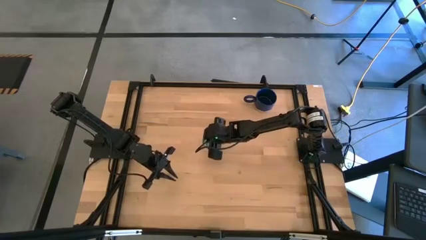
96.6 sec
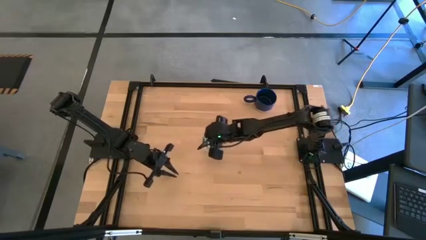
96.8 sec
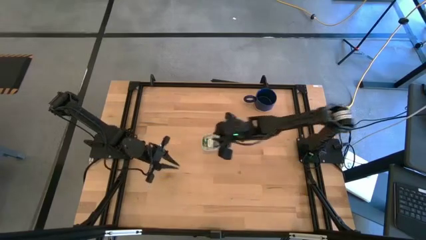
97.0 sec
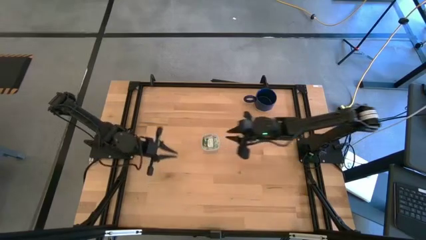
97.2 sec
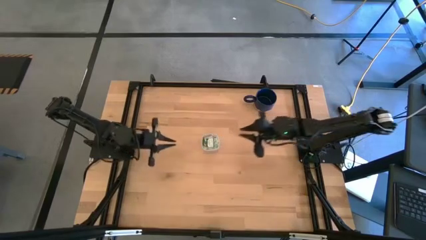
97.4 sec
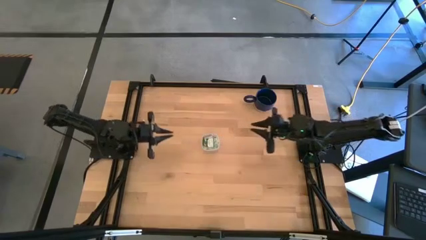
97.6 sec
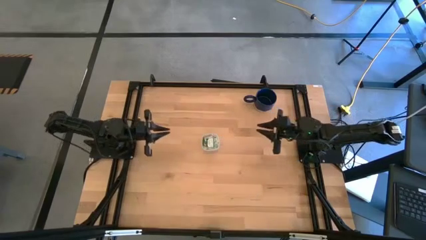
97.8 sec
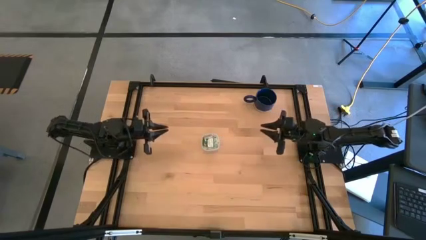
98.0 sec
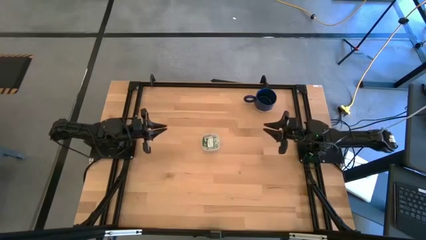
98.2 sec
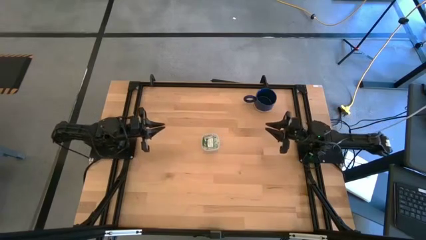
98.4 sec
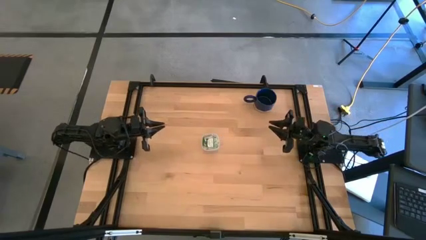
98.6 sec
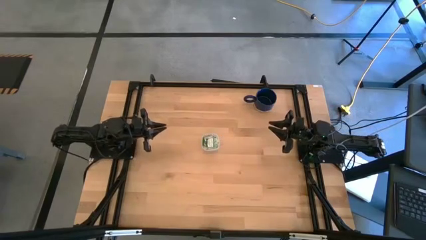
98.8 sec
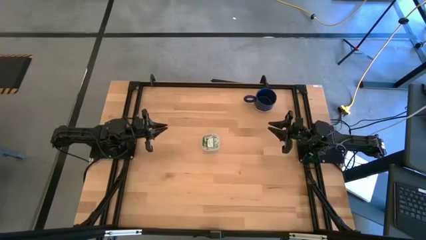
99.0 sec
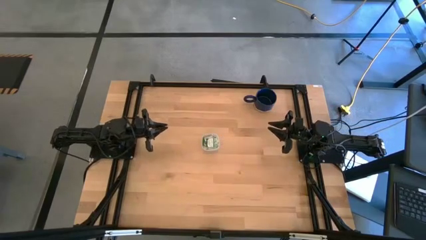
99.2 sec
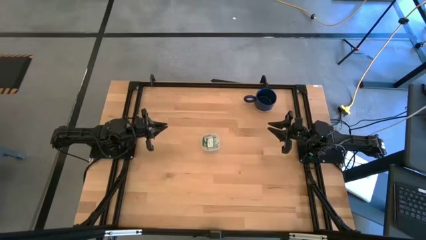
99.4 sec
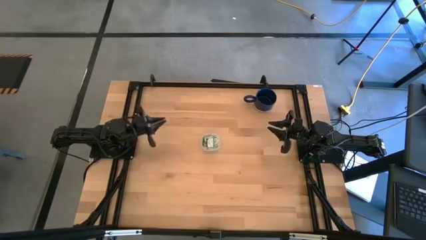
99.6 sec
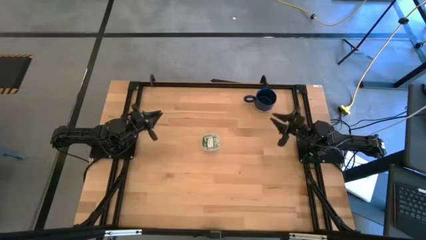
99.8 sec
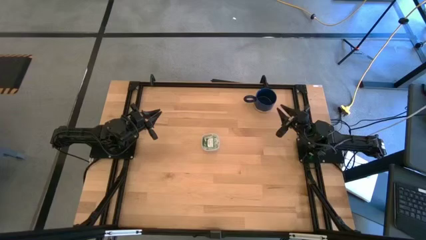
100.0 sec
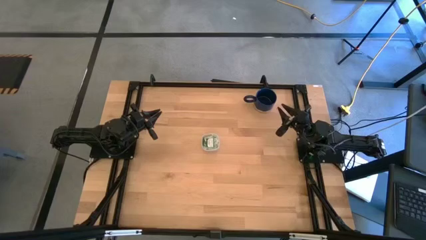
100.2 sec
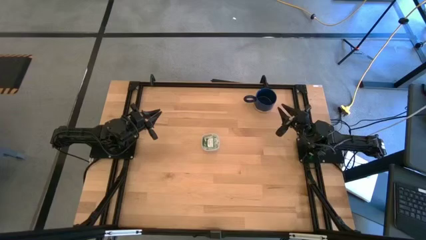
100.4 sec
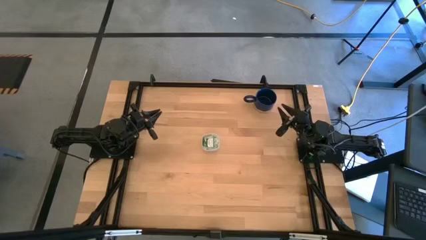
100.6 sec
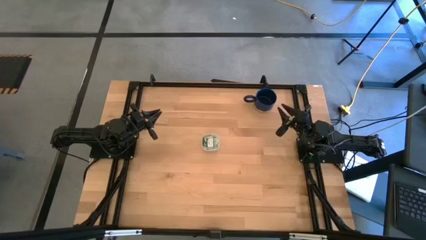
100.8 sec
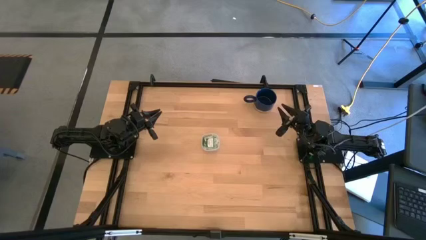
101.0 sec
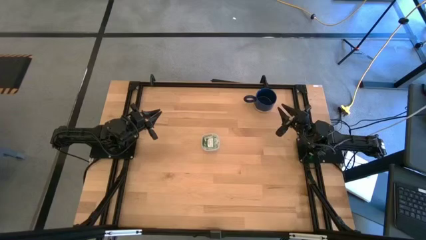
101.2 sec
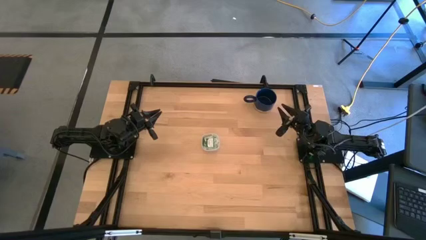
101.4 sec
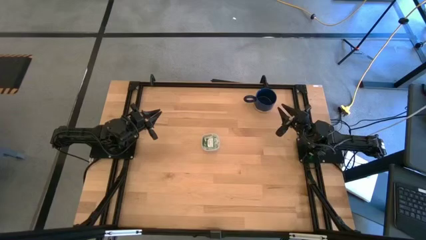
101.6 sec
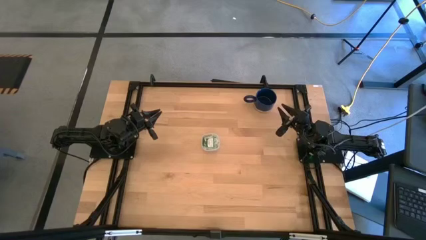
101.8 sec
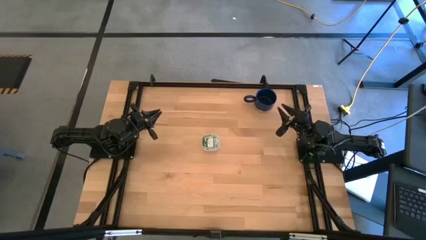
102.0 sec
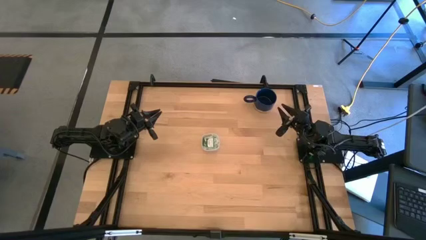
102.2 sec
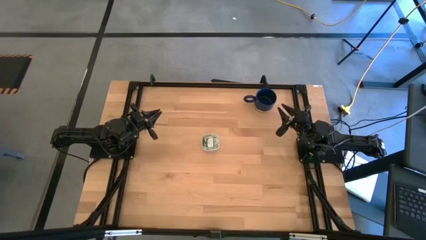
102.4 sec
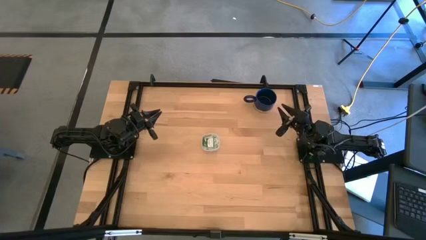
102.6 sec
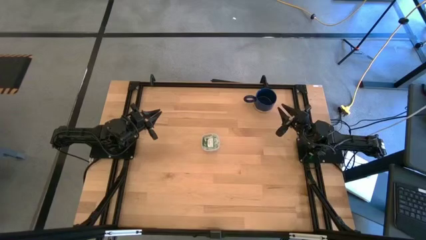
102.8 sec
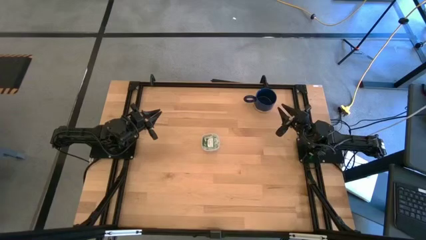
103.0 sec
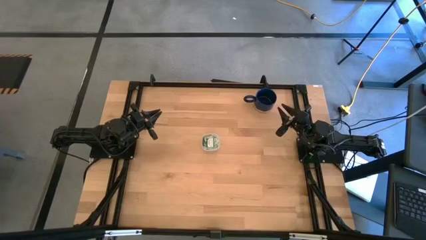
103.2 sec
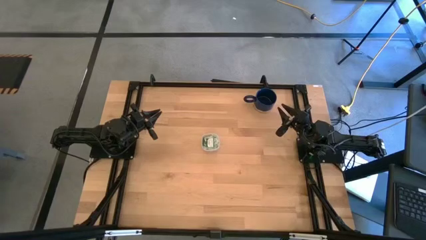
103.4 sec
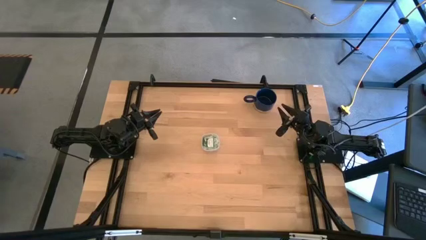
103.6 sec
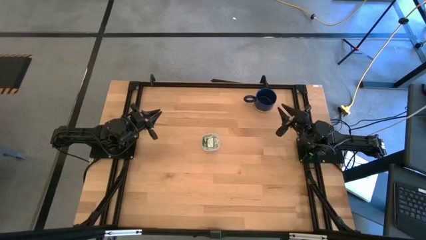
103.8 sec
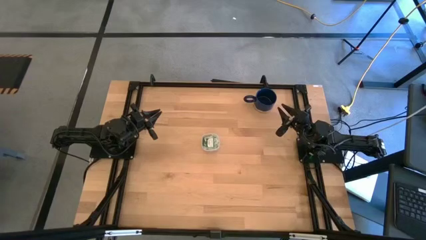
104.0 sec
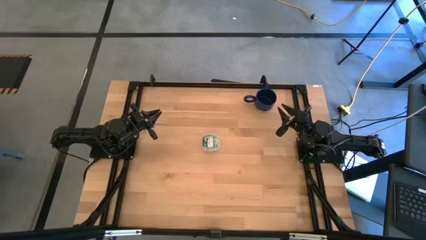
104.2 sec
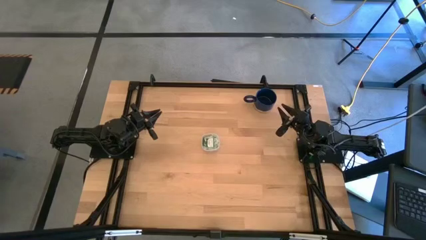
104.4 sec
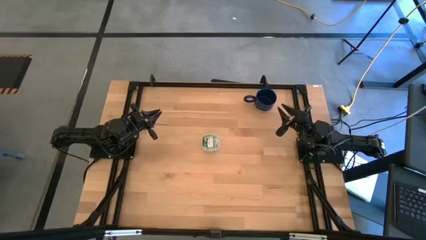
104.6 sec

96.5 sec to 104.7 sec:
Task: Pick and place Stevia / Truvia into bins
Return to Home Position

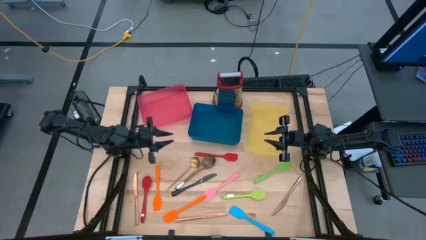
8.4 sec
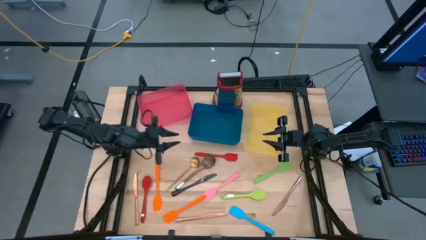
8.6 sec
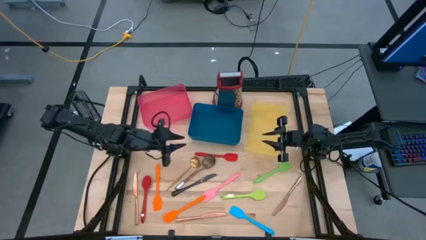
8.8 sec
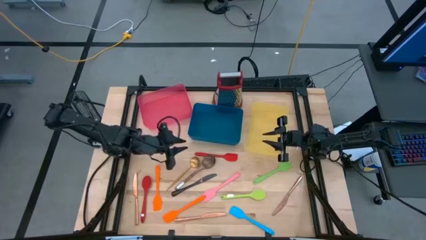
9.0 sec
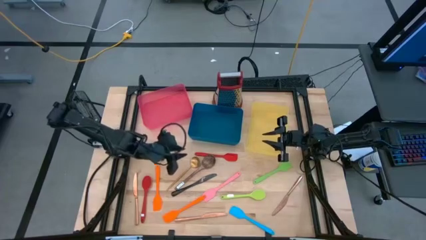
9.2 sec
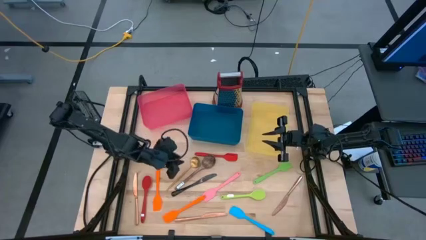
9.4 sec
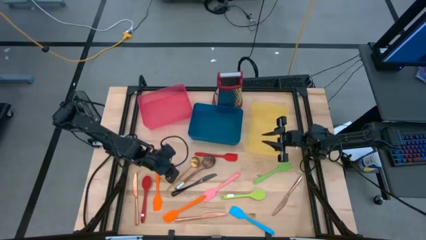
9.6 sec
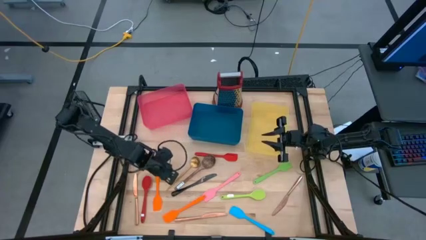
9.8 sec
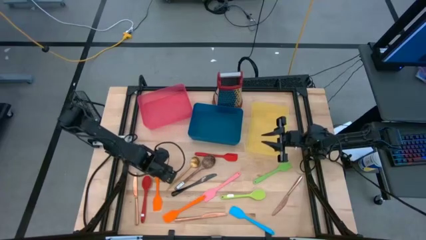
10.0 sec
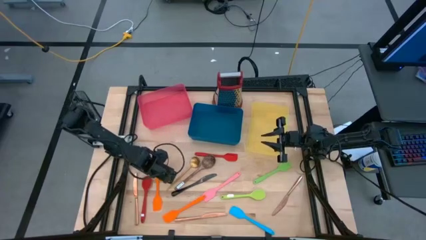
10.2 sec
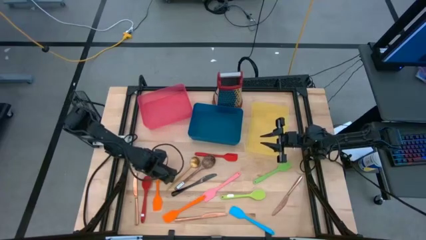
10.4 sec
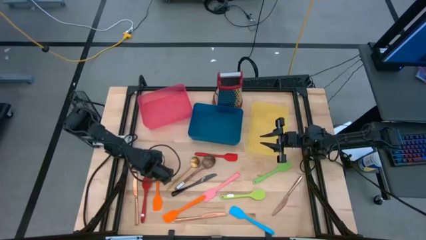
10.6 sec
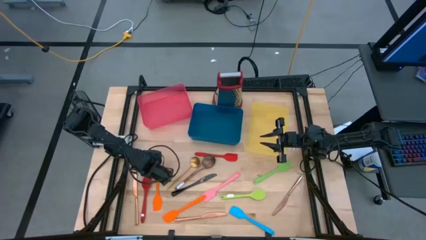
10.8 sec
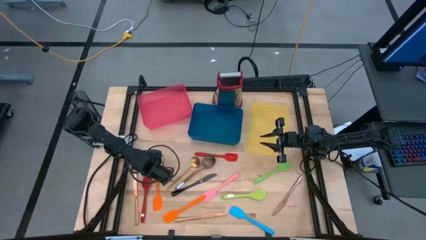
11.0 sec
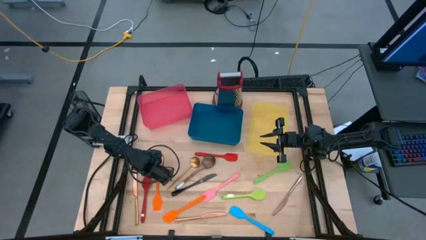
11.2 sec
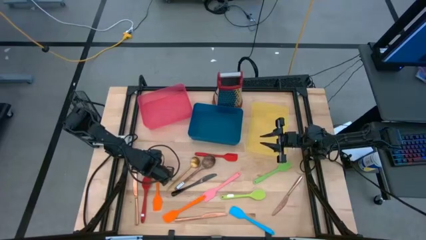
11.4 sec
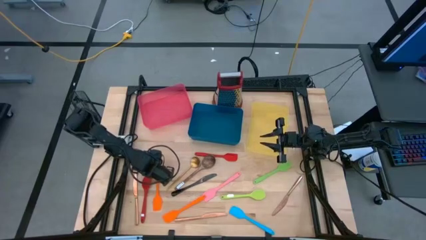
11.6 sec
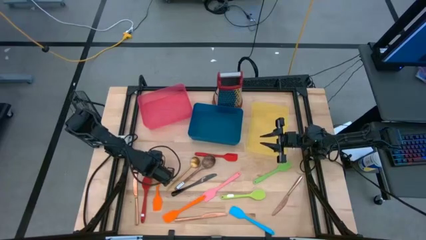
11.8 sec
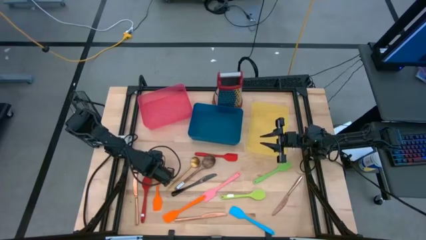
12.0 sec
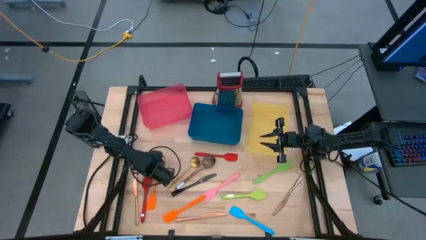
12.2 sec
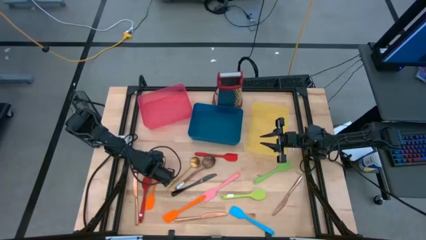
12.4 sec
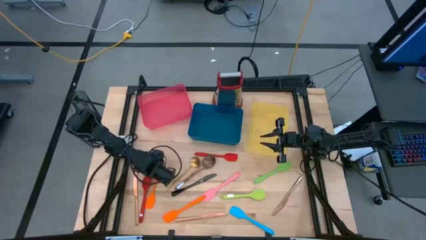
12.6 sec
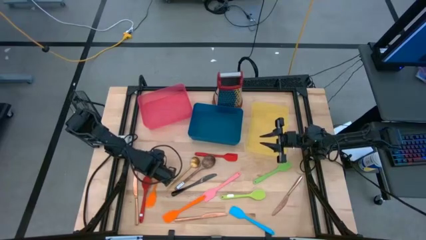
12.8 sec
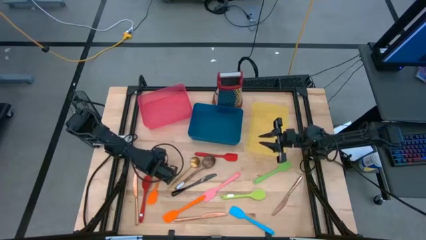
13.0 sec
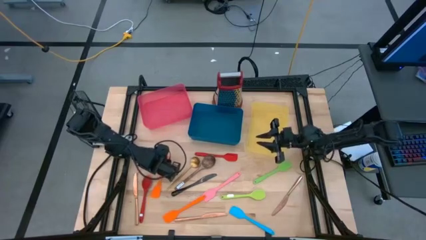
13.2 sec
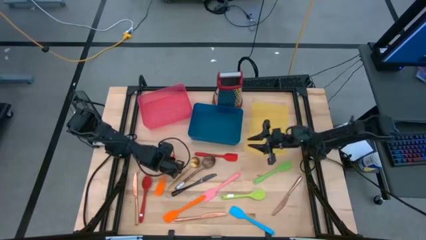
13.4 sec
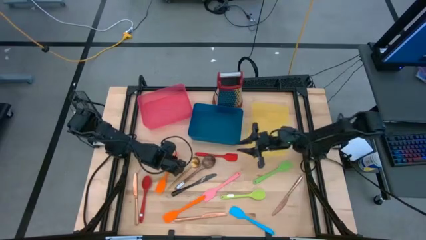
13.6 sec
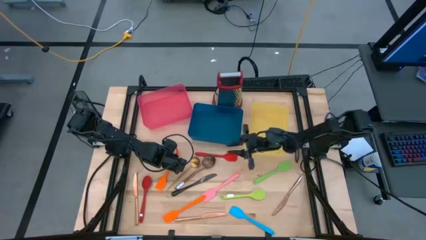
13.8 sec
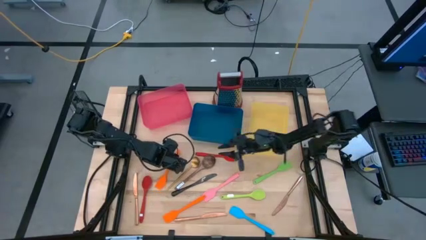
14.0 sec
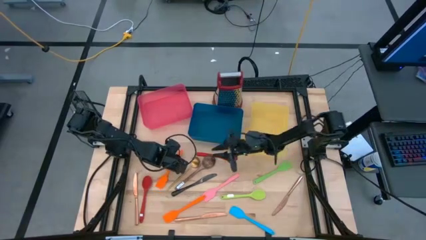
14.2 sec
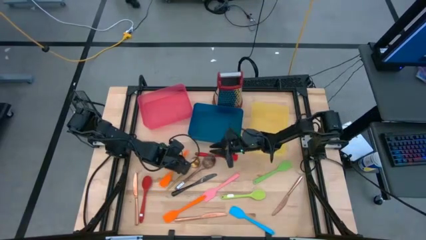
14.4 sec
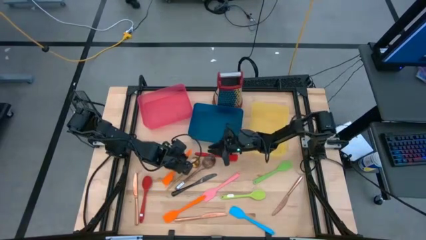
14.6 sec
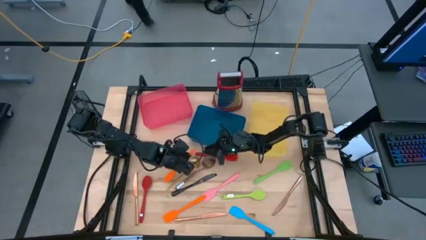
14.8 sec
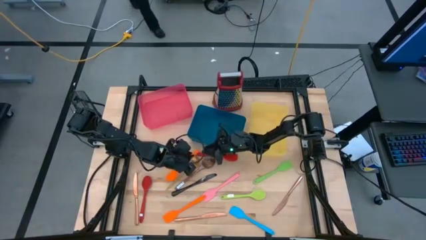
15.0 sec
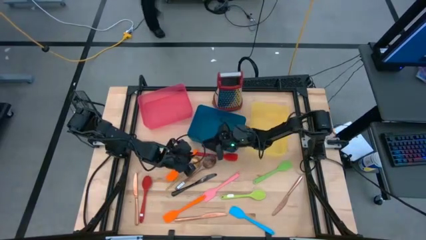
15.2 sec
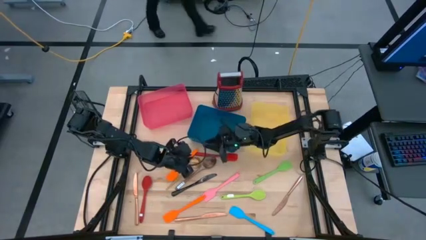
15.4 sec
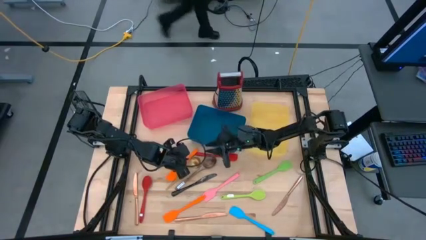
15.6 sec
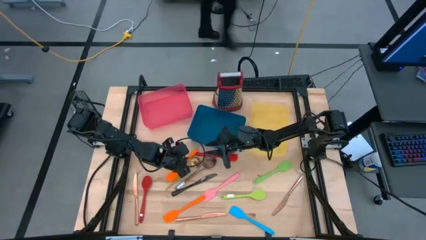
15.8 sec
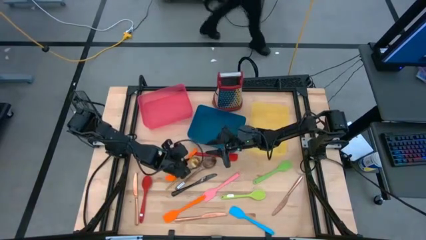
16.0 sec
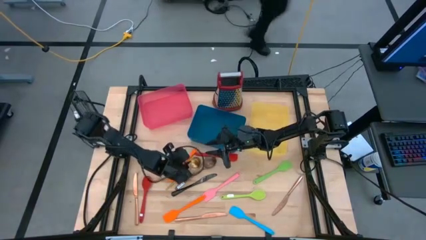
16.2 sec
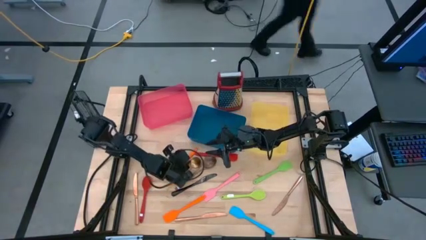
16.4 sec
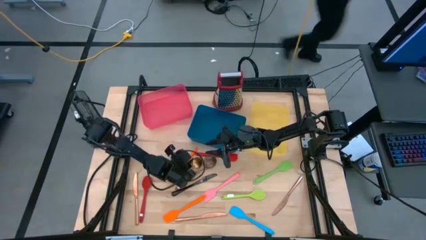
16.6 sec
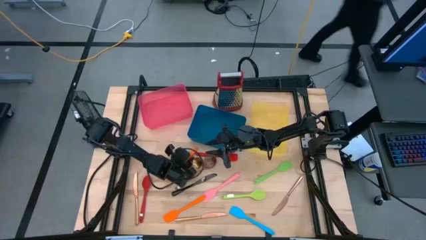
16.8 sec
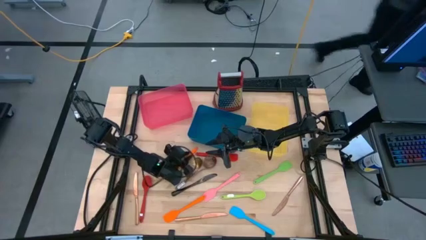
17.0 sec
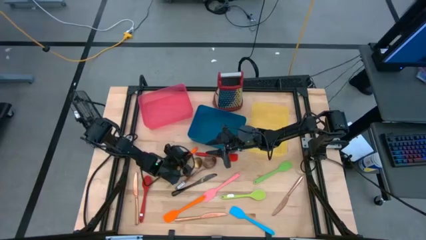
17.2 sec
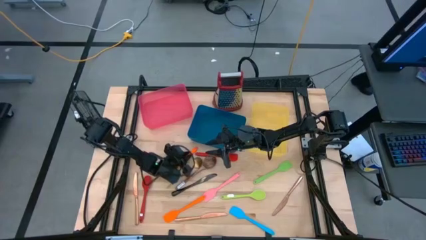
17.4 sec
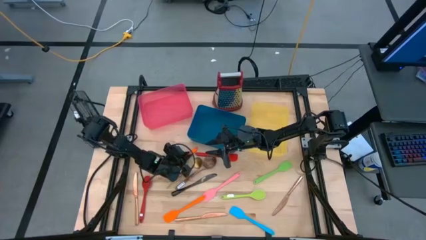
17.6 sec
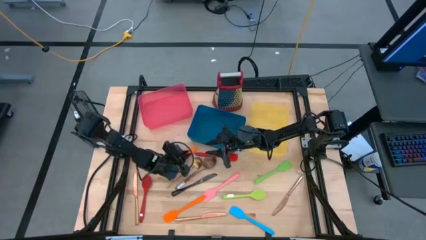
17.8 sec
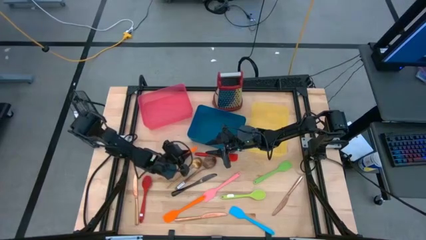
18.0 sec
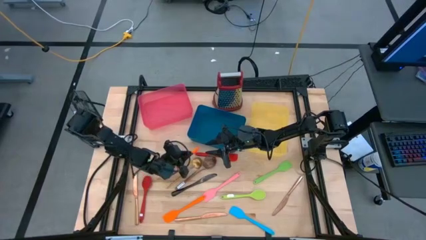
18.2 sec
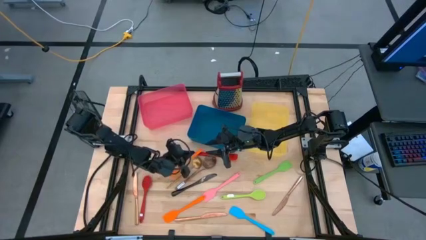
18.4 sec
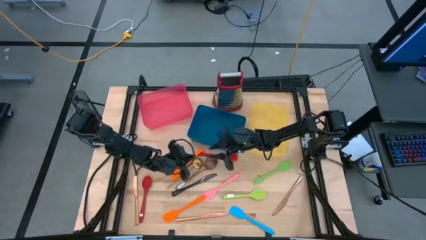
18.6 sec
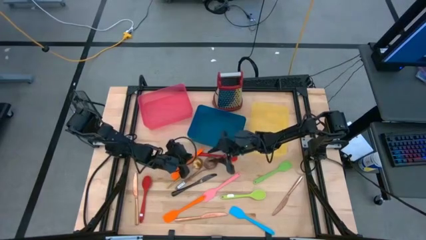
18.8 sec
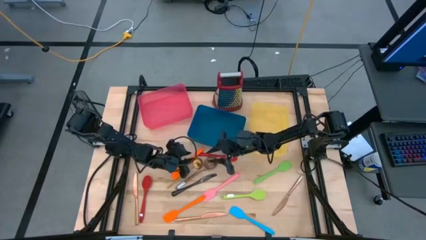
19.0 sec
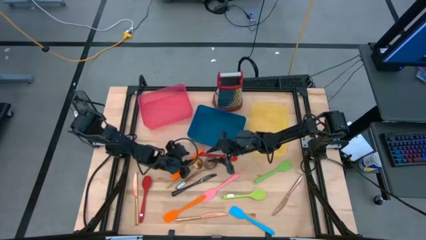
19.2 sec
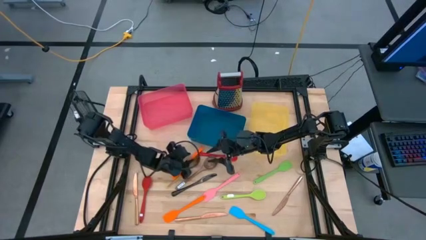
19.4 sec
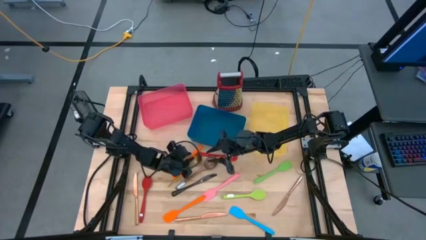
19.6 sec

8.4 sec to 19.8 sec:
Task: Pick & Place Kitchen Items
Put the orange spatula into the blue bin
